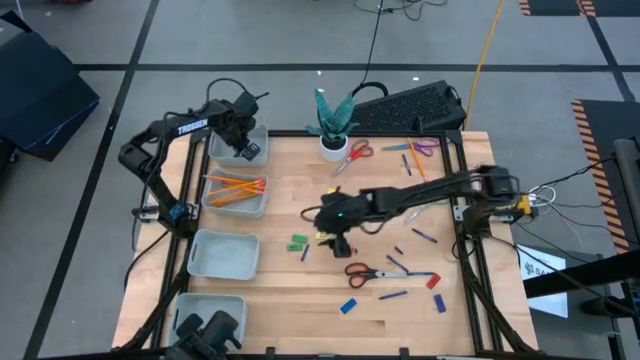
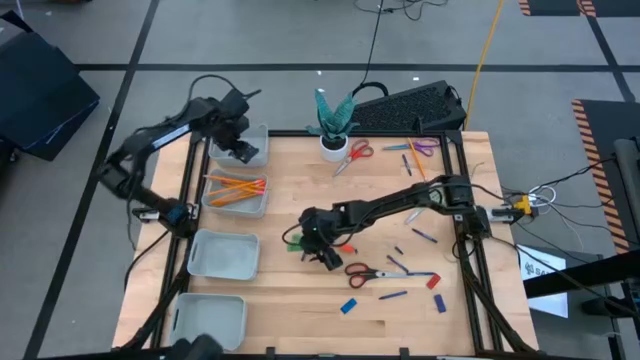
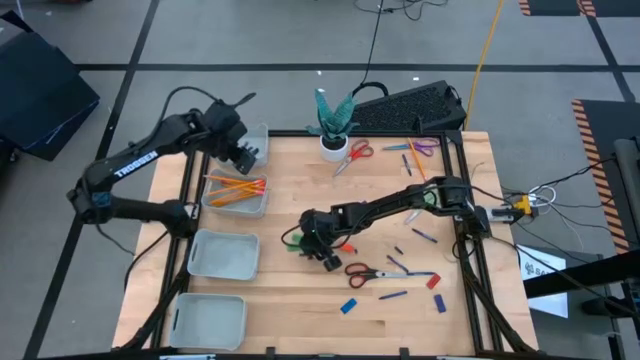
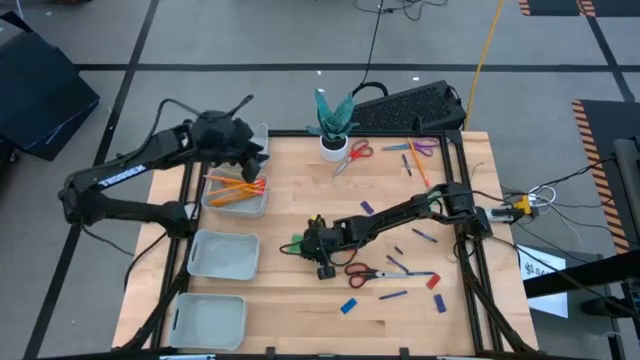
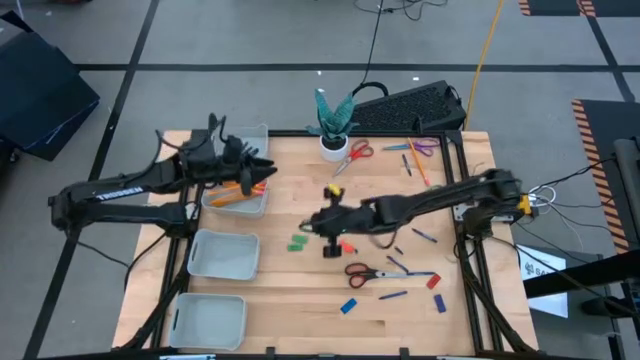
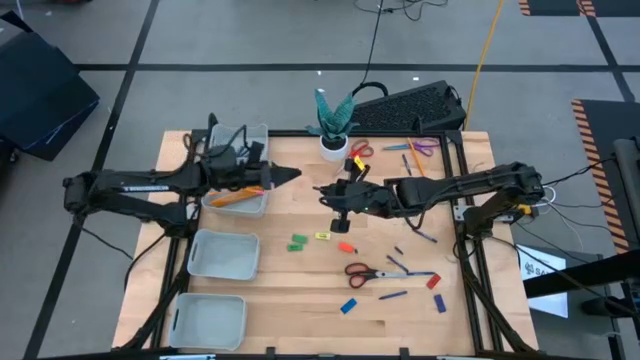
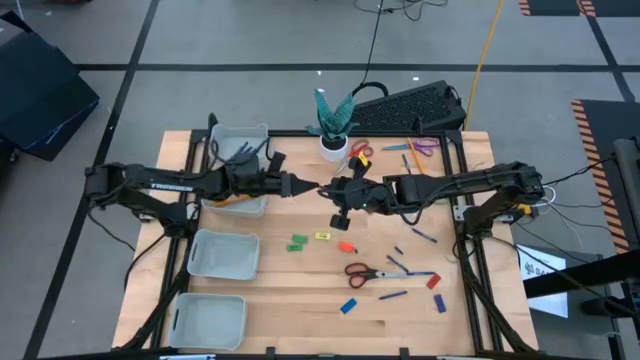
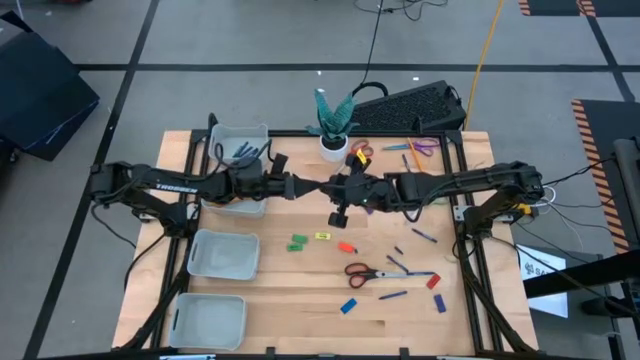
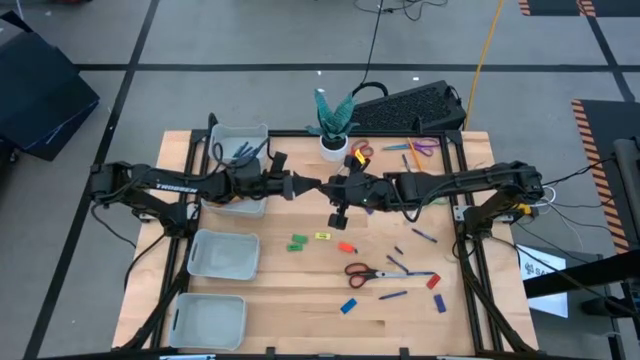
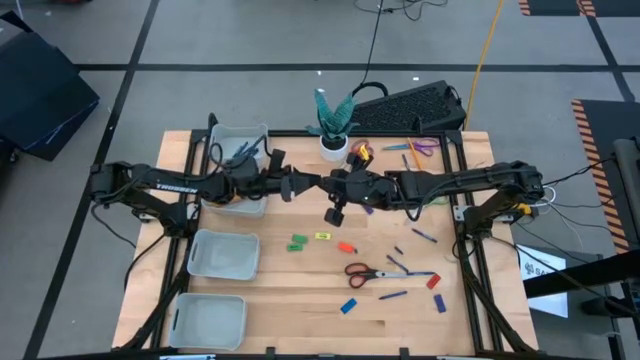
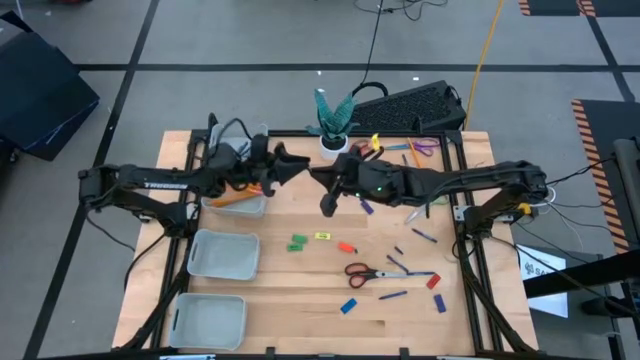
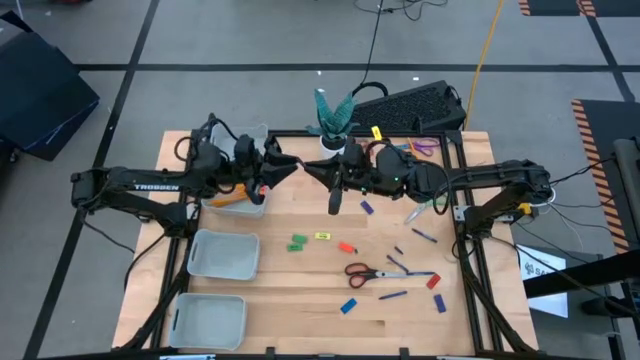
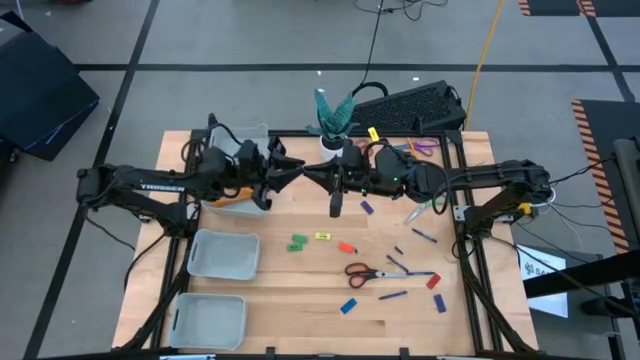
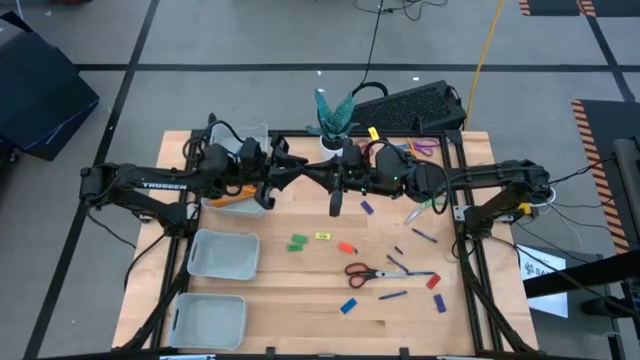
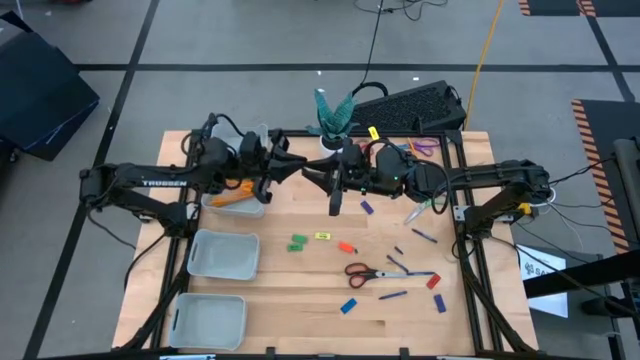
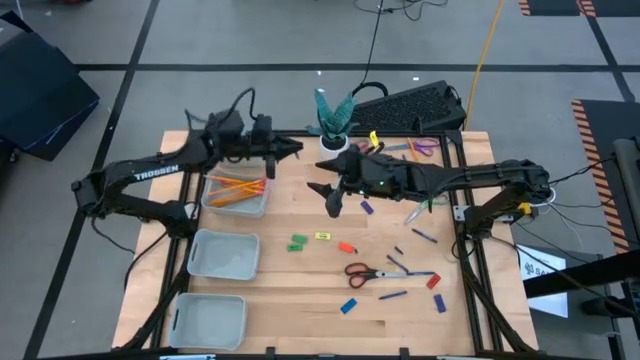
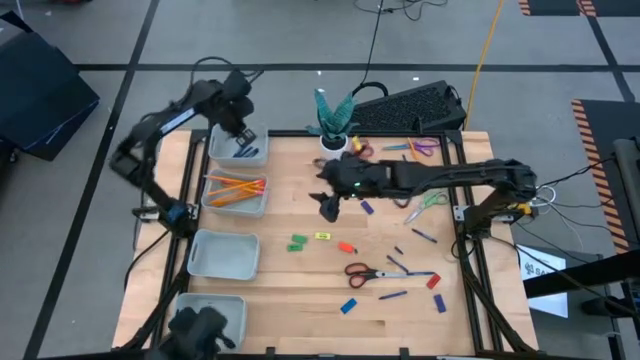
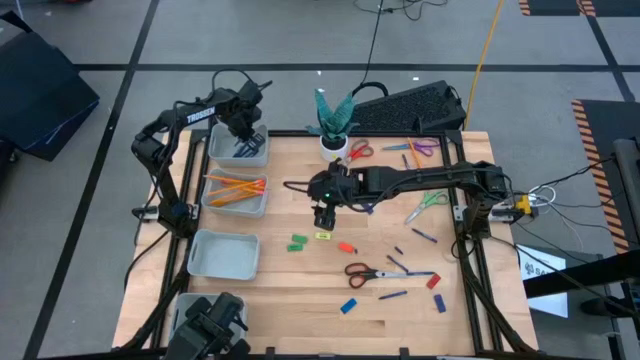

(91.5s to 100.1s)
Task: Sort crayons/erasers/pens/pencils in bins
Put the blue crayon into the top gray bin

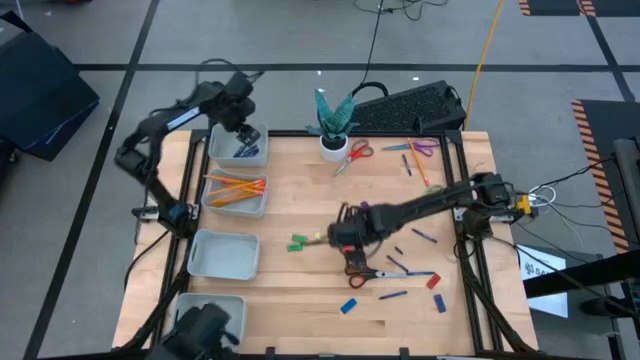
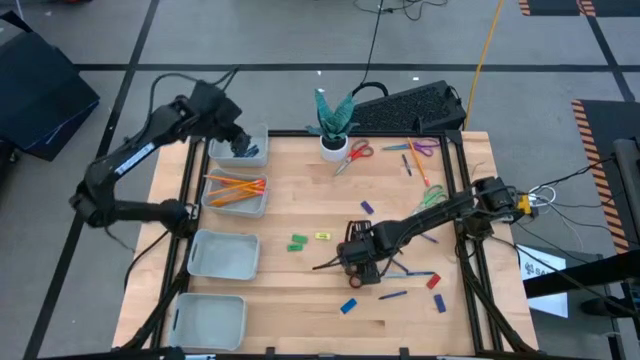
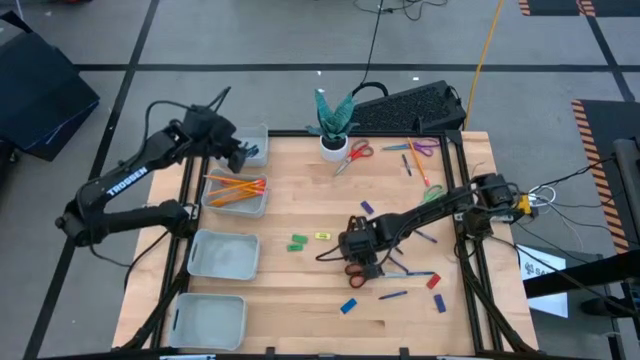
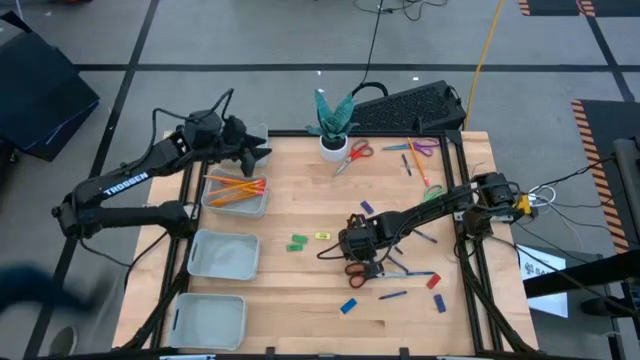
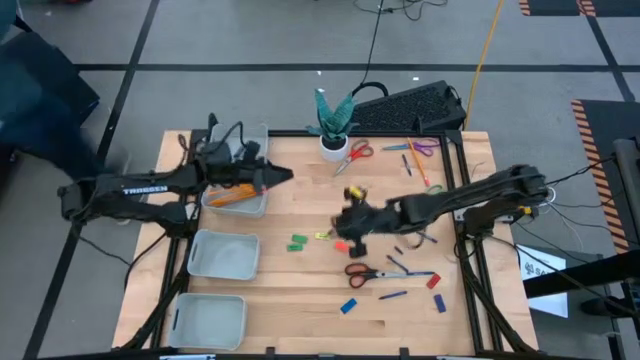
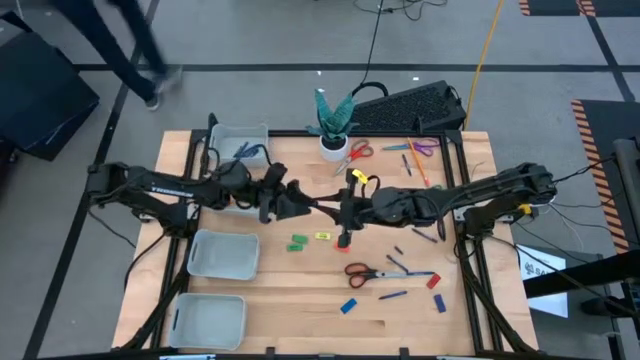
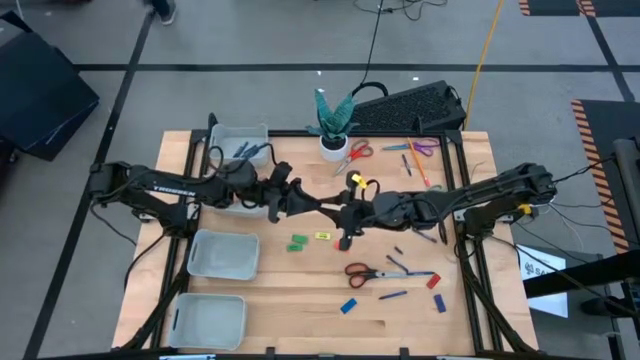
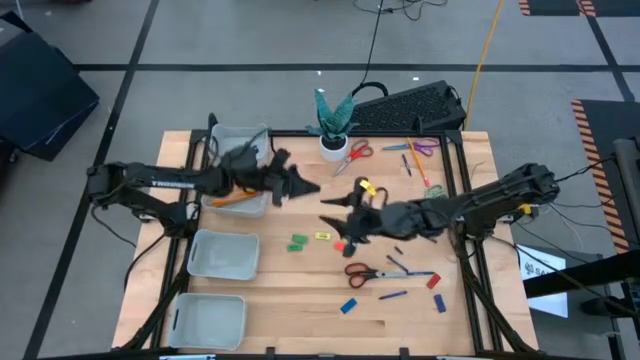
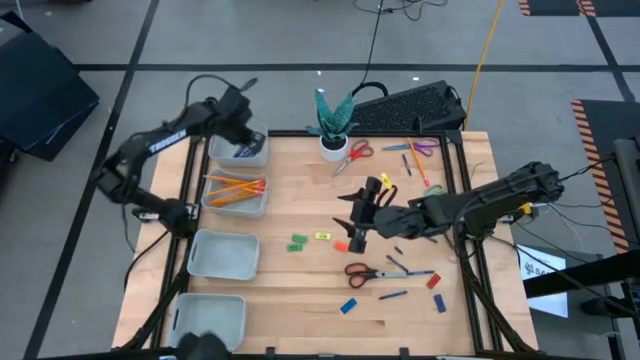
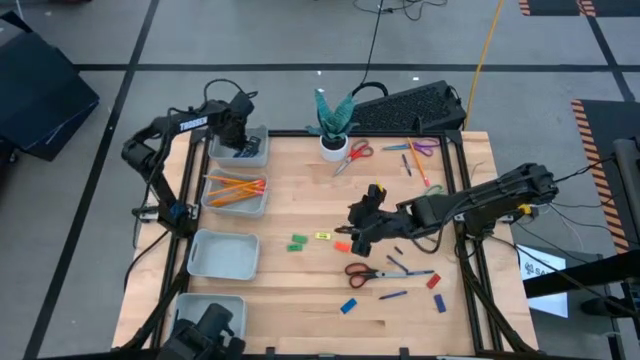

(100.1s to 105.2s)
Put the blue crayon into the top gray bin

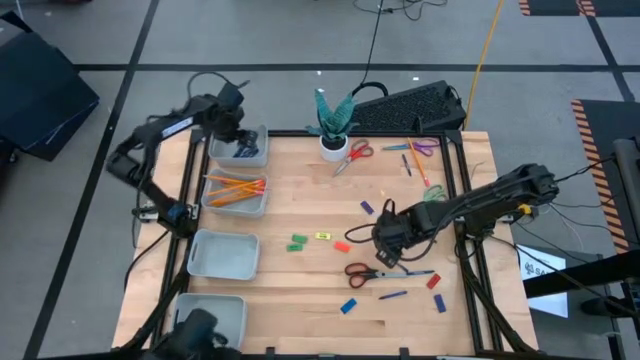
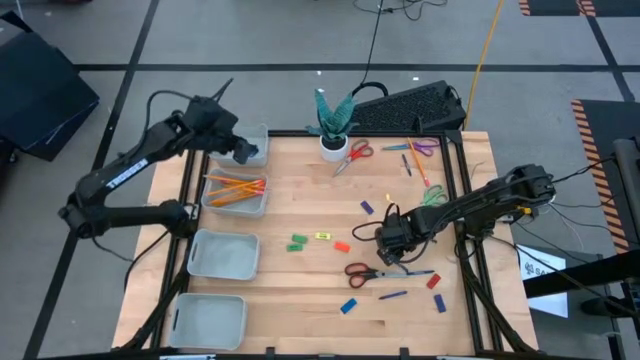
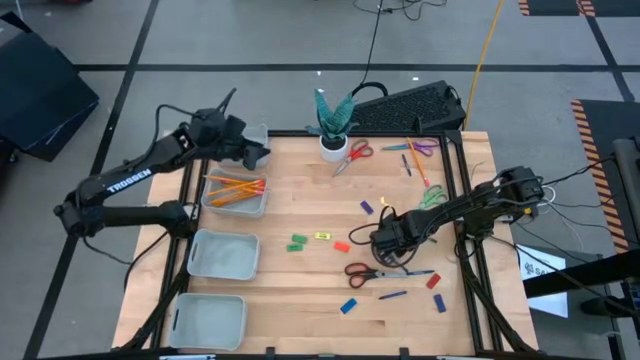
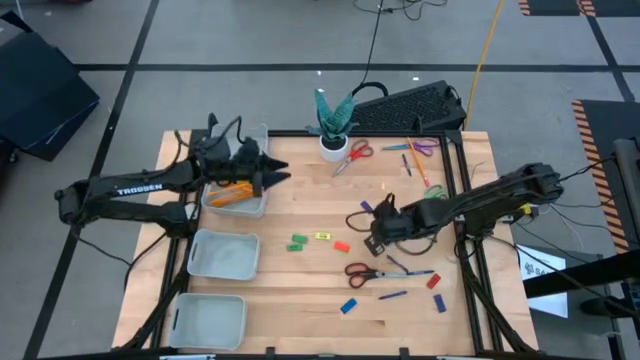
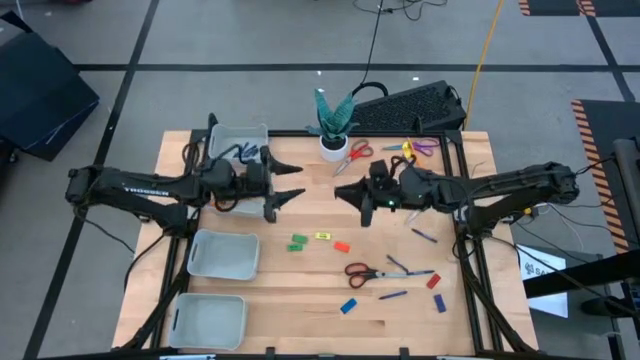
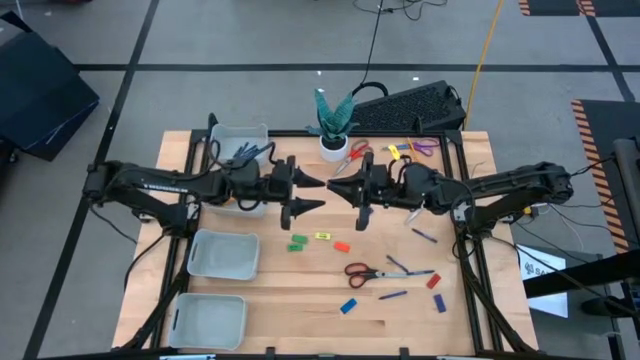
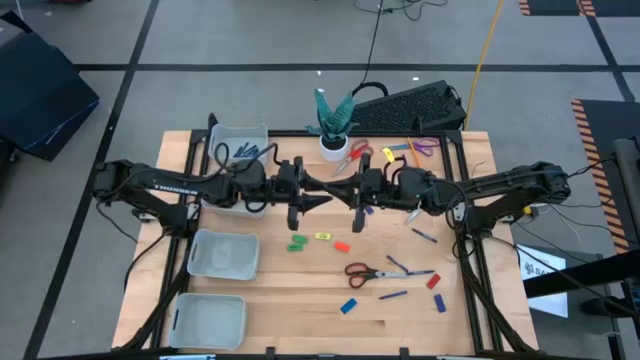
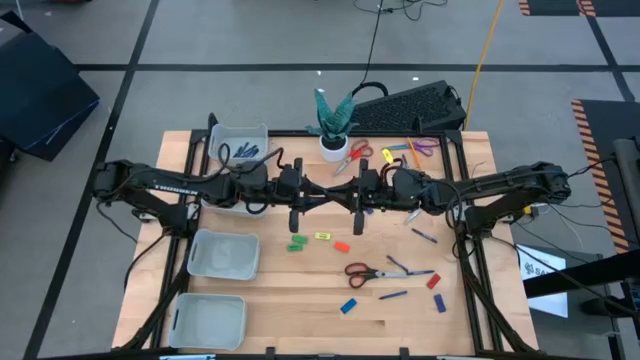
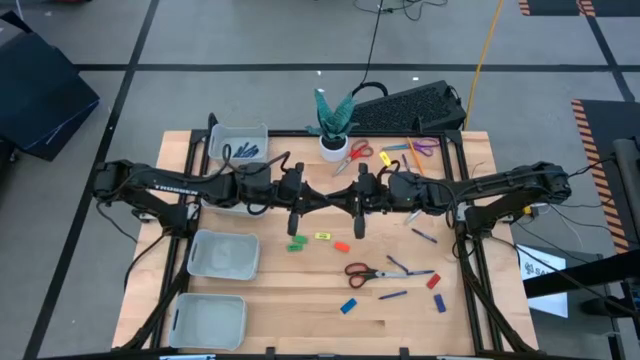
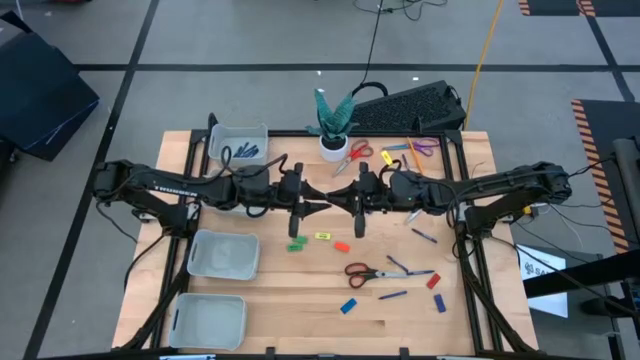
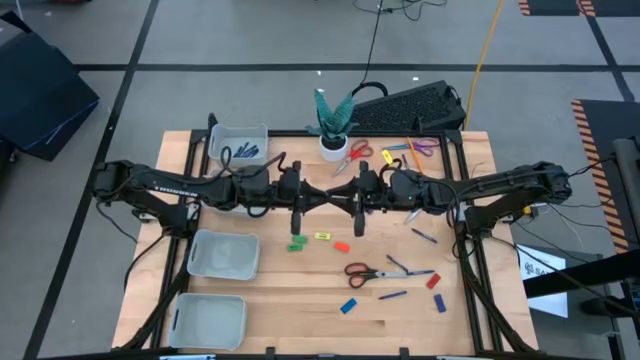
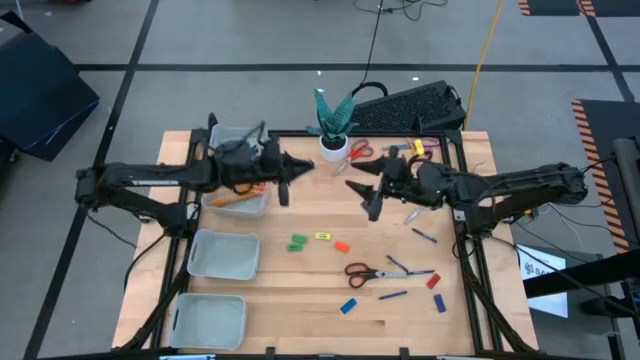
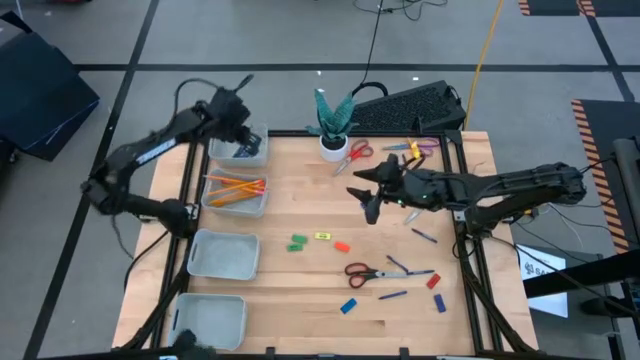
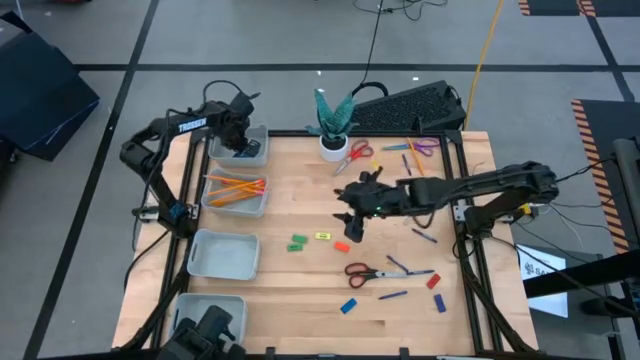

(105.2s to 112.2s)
Put the blue crayon into the top gray bin
